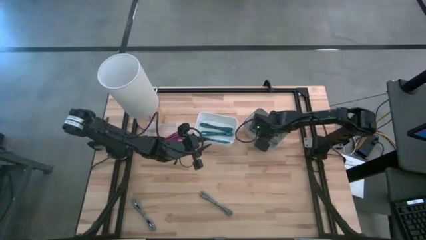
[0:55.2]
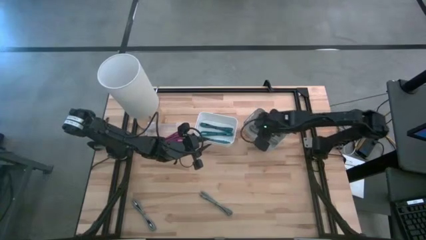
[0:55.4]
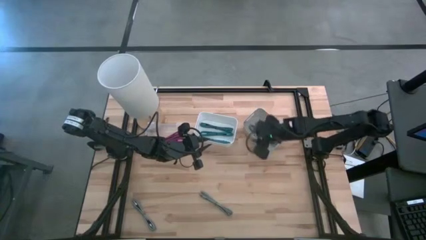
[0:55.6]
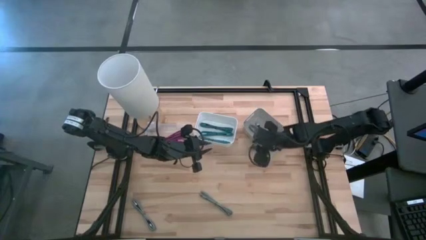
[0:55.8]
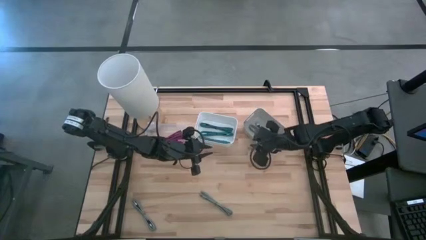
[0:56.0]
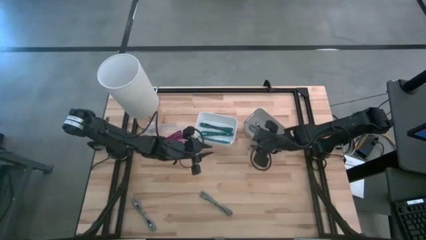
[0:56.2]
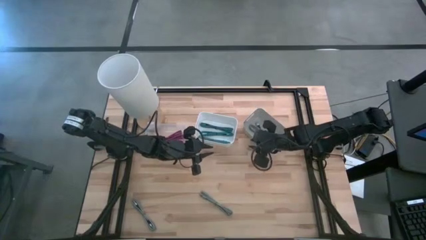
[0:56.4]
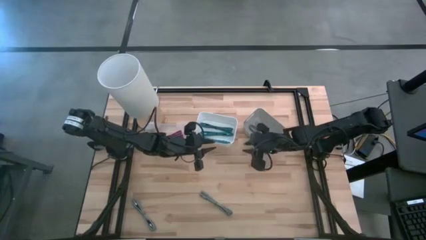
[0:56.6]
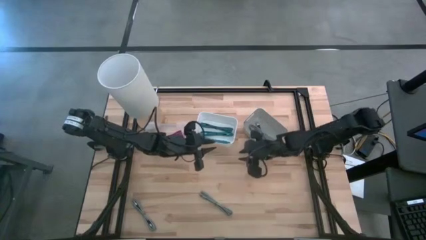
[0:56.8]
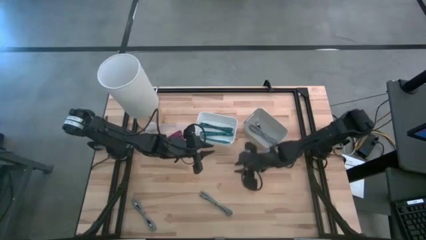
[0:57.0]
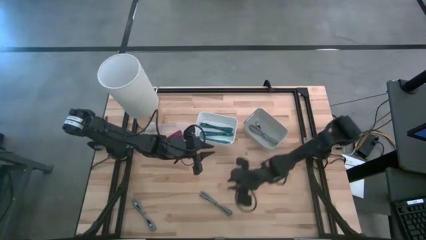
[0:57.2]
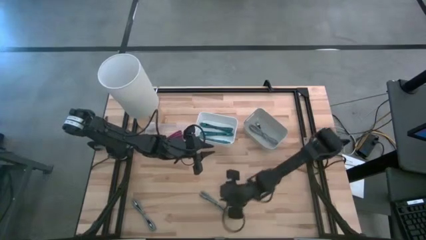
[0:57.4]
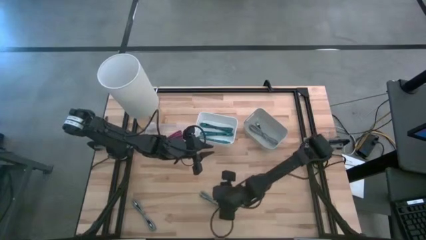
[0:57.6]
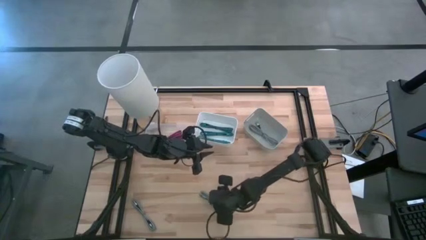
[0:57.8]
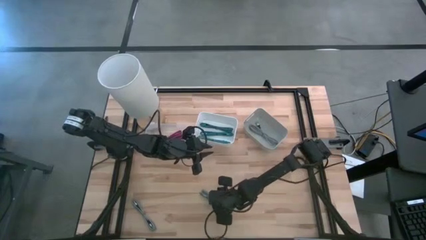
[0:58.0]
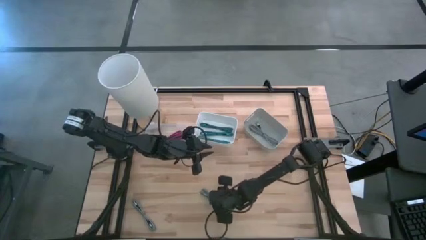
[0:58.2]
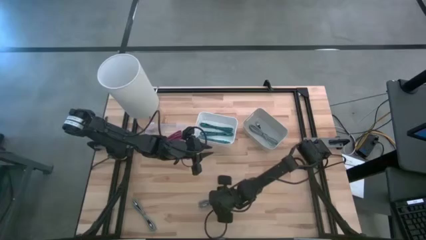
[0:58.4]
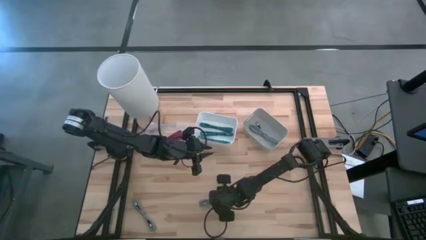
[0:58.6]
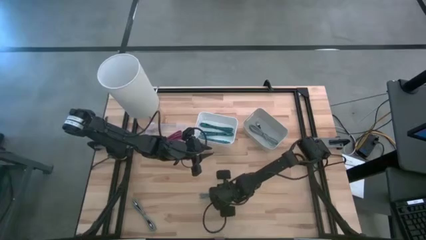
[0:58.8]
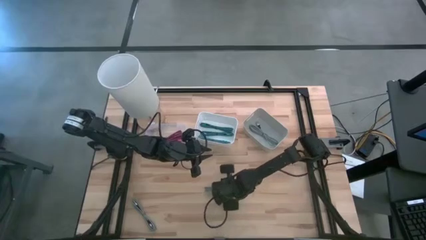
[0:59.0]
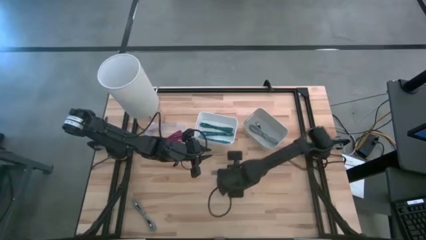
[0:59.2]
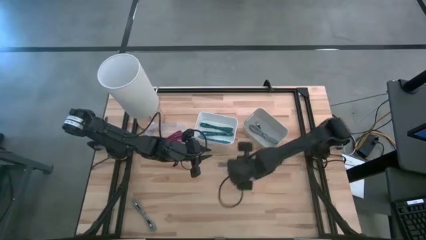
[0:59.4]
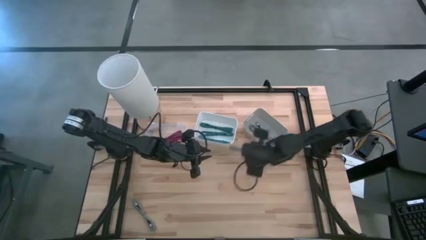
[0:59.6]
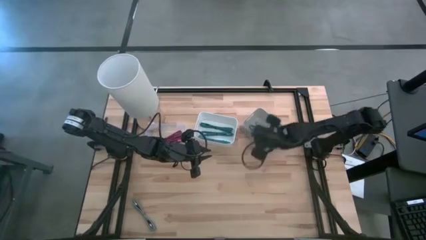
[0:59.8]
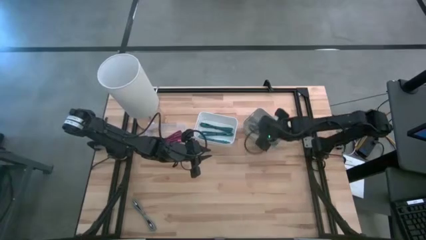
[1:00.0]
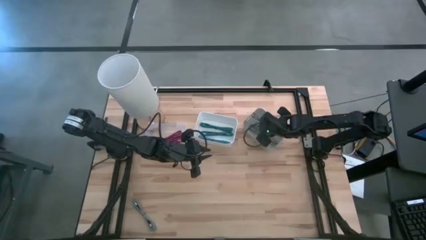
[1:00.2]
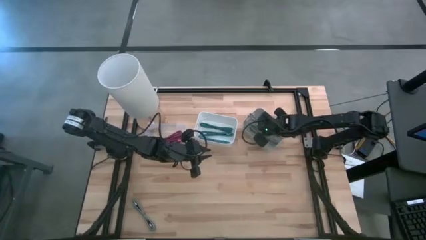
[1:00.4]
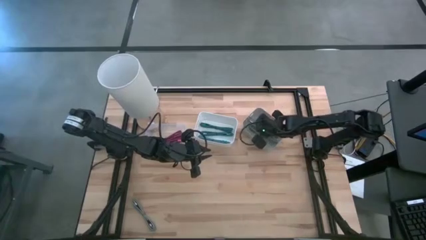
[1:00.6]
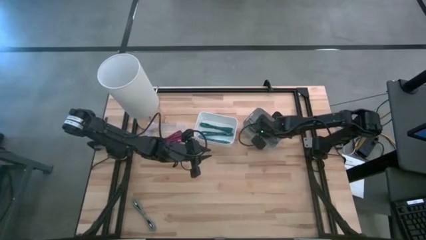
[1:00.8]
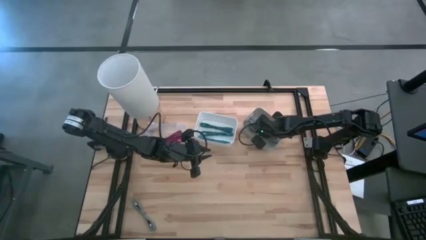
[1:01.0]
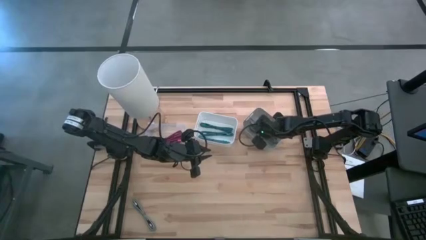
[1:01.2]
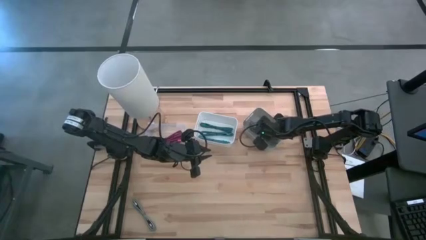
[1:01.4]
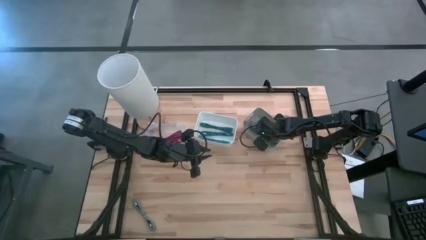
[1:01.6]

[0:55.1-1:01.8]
Task: Pick & Place USB Port
Put the right black patterned charger cable into the gray bin

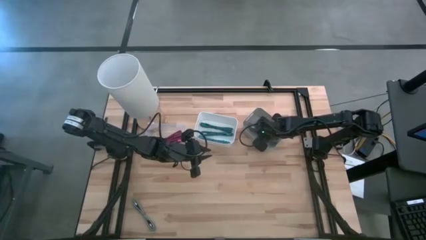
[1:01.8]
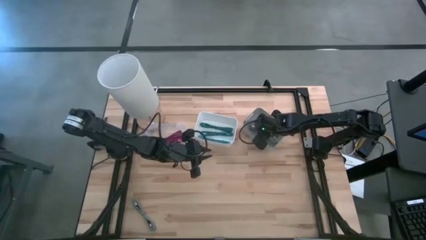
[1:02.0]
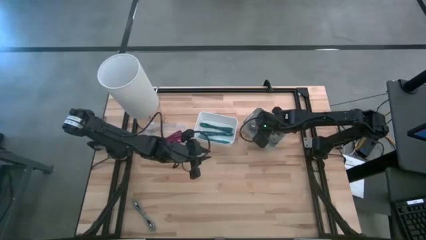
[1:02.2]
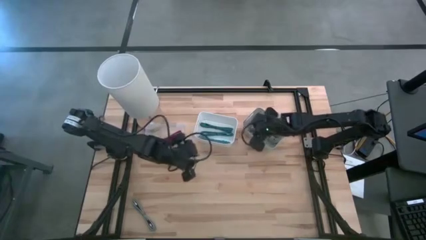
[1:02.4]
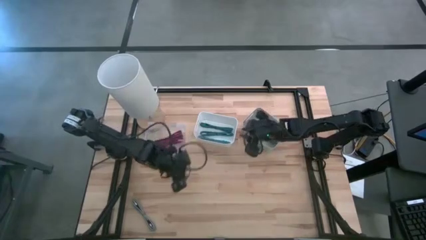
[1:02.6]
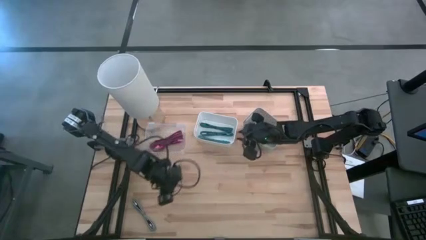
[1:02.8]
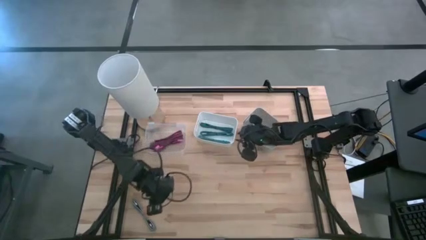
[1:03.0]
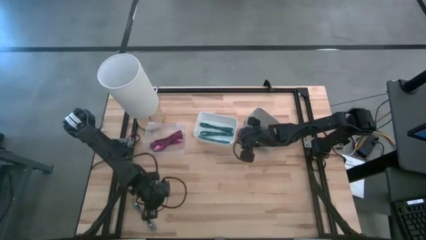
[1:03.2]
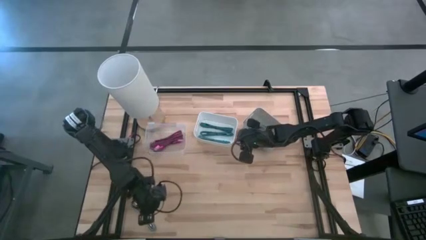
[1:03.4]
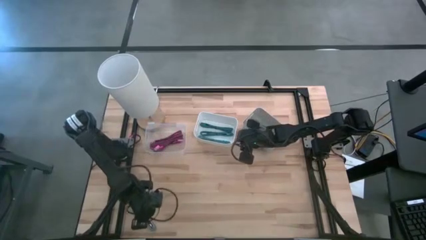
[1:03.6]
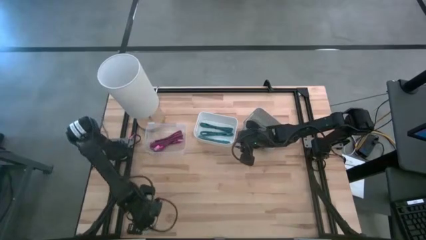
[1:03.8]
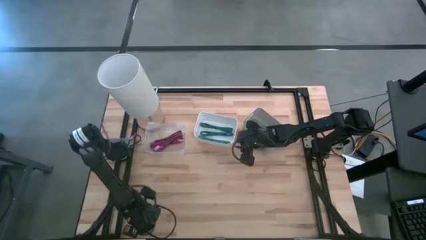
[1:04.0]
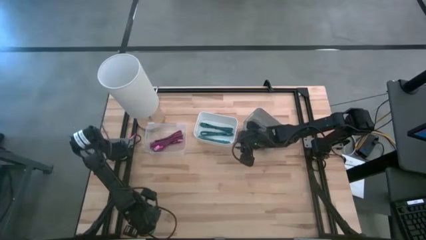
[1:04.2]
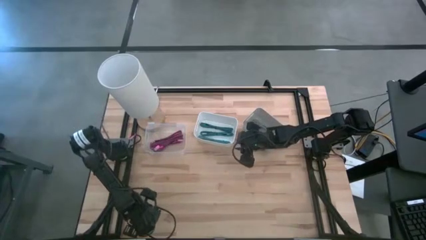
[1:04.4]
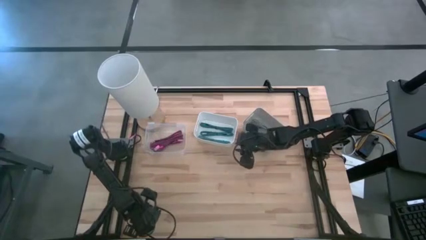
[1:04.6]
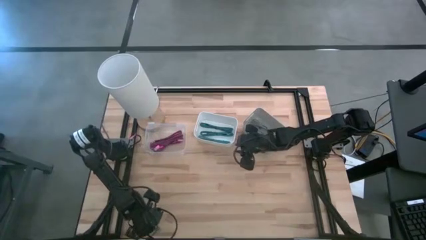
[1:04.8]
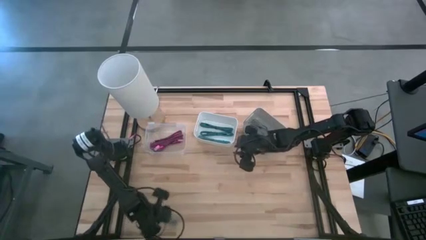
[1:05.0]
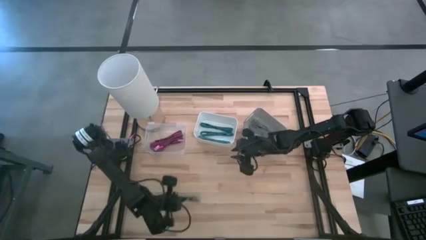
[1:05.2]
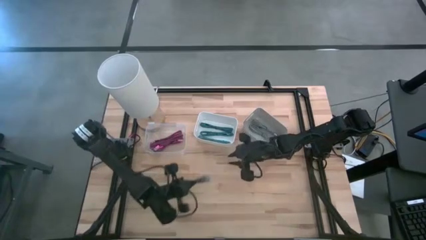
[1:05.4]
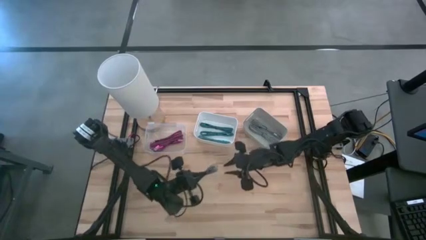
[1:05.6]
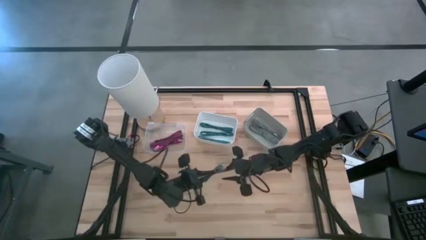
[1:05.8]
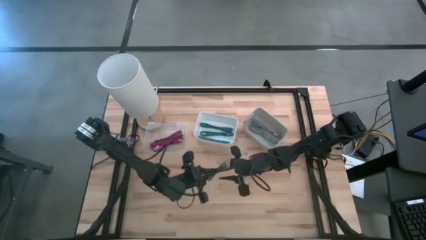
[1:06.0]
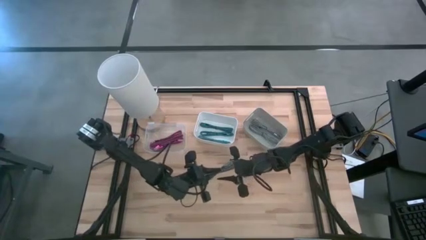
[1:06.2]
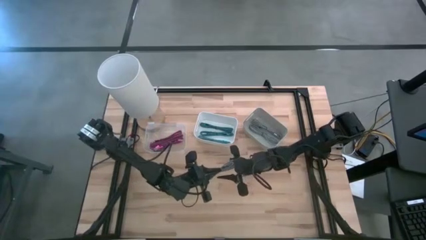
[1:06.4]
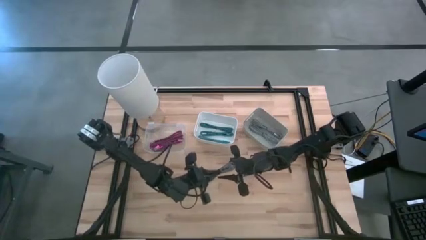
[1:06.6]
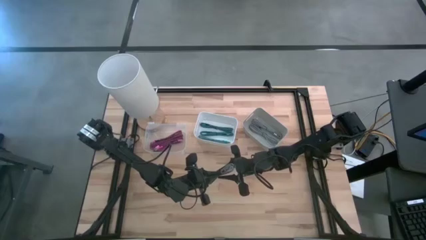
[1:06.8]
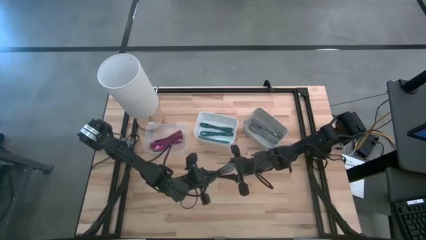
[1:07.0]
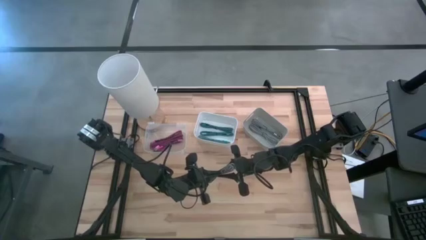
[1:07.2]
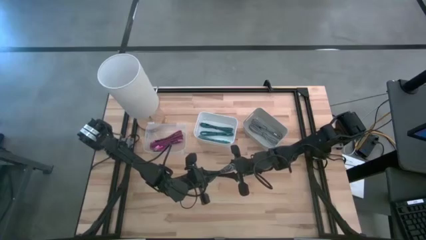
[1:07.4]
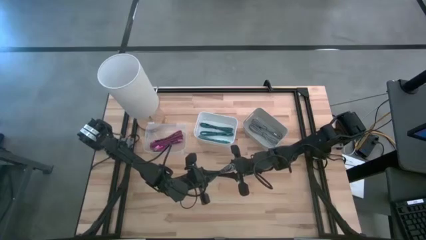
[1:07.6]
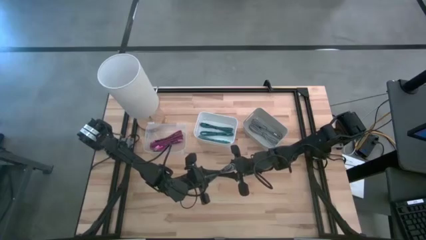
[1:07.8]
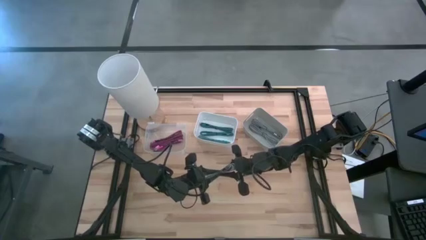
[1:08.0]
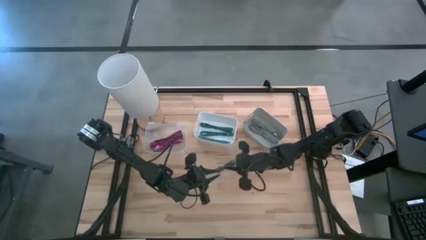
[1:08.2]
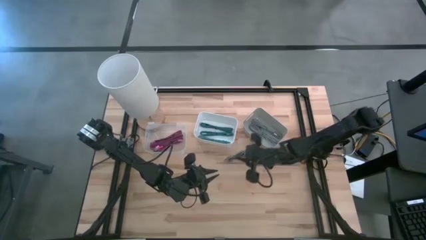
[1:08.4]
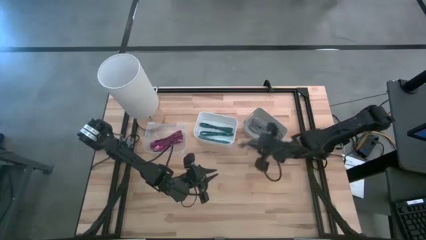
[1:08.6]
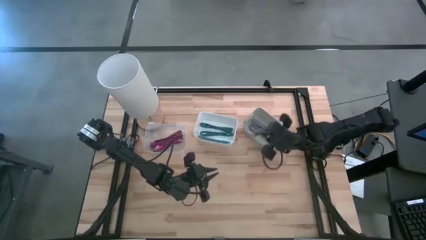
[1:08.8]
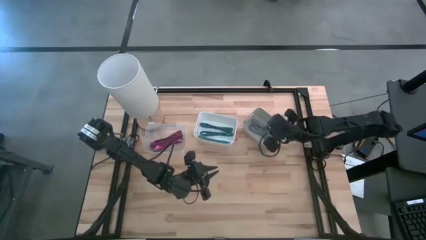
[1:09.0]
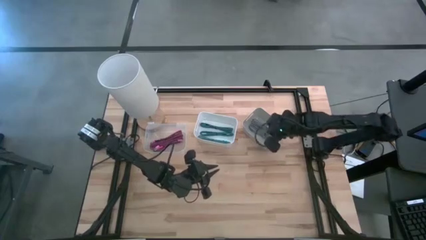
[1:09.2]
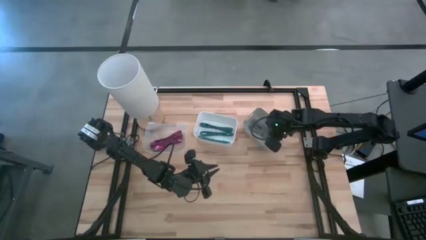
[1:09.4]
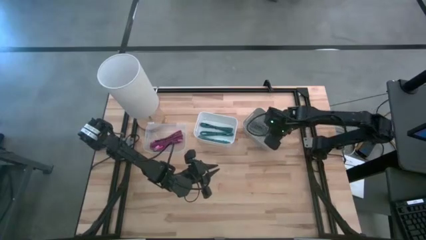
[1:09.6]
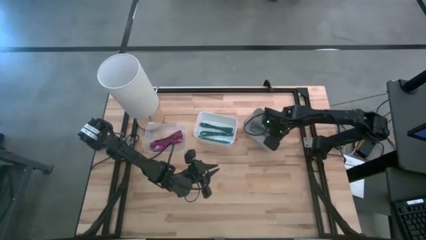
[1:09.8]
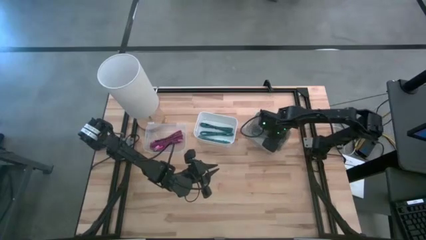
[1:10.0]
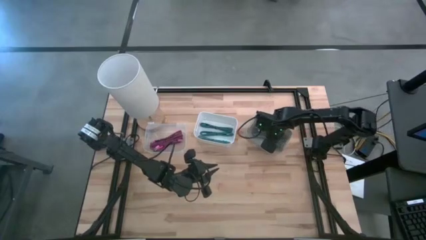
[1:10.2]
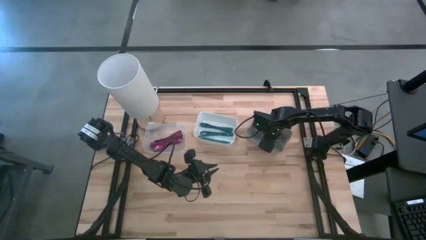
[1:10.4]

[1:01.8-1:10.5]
Put the black patterned charger cable into the gray bin
